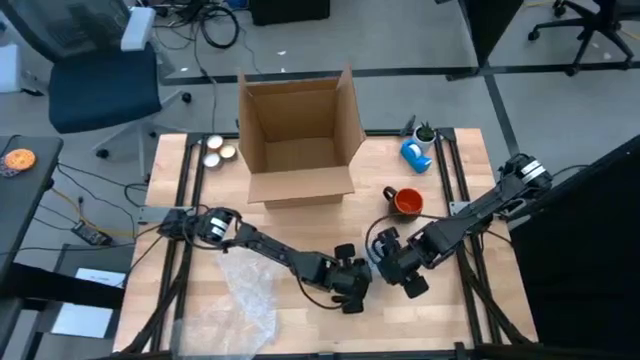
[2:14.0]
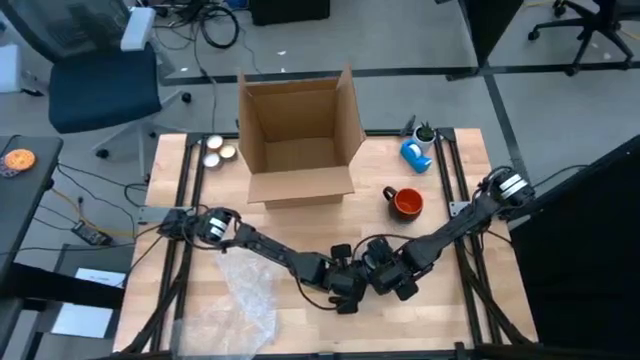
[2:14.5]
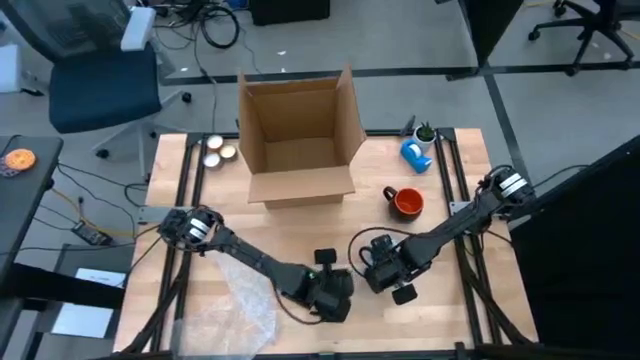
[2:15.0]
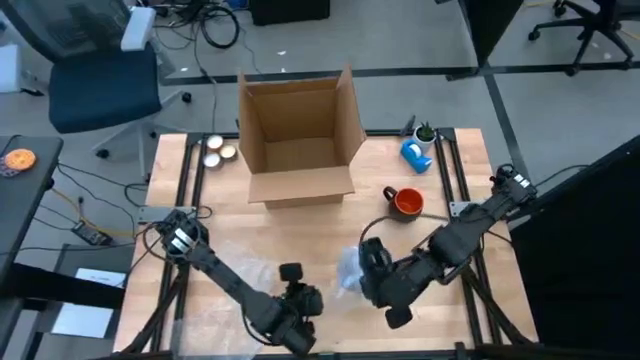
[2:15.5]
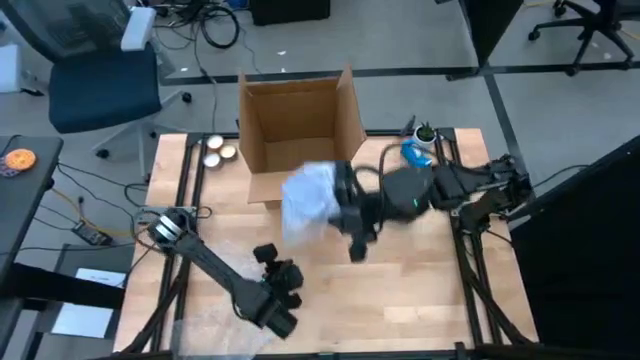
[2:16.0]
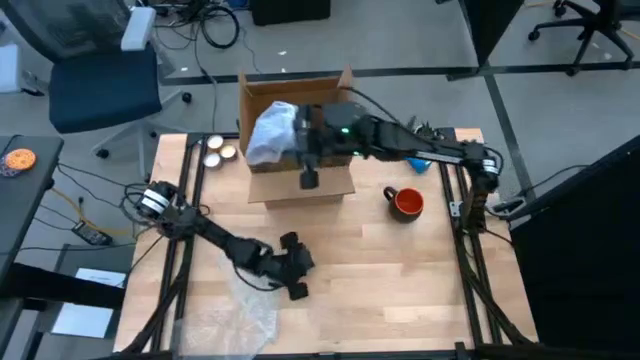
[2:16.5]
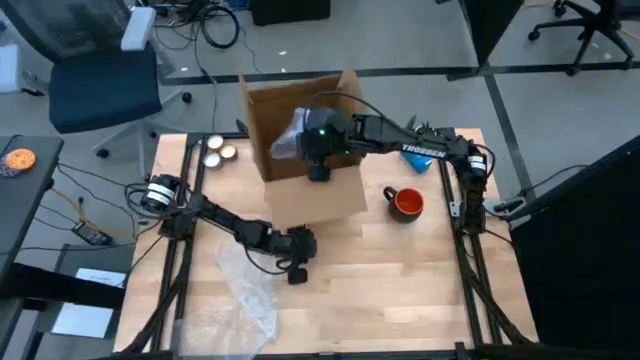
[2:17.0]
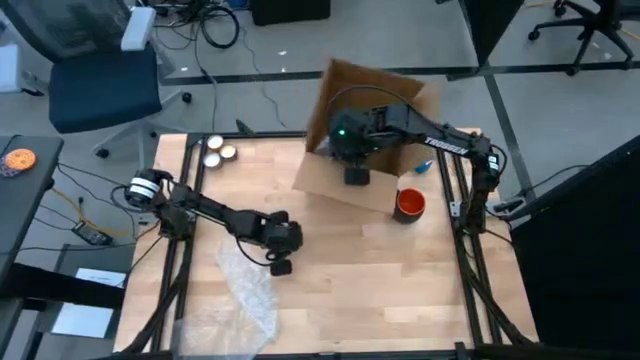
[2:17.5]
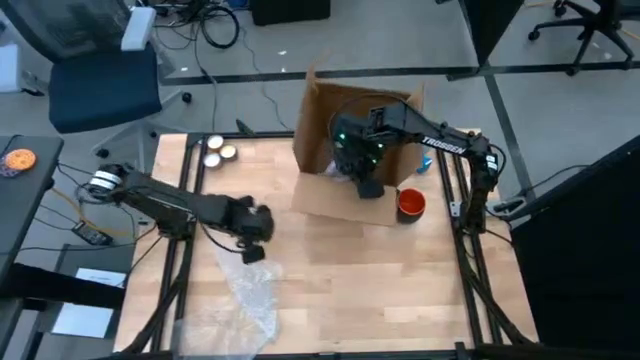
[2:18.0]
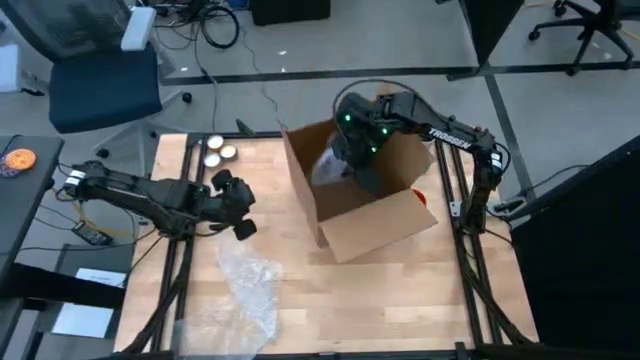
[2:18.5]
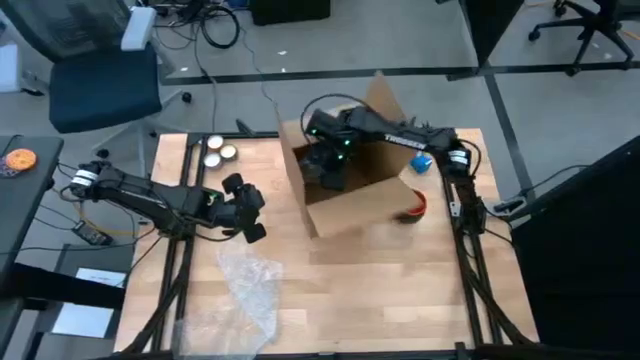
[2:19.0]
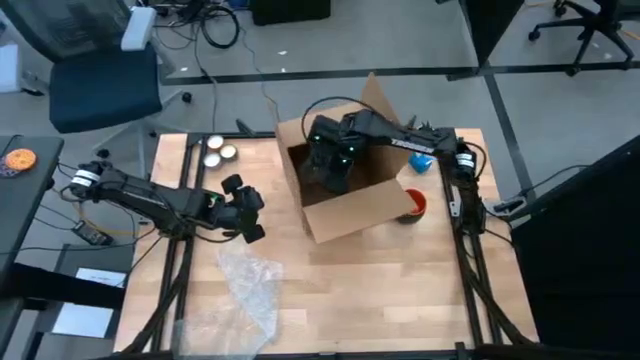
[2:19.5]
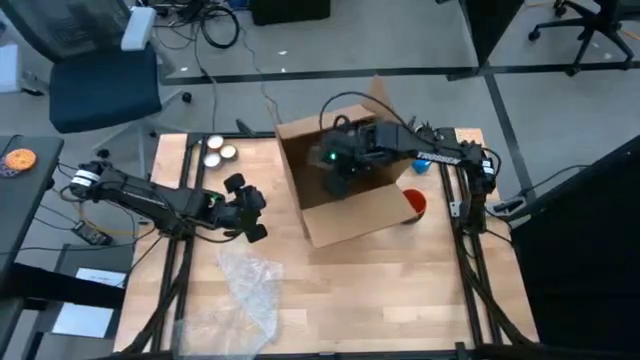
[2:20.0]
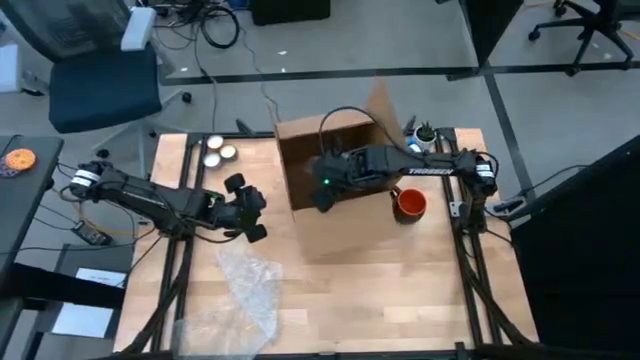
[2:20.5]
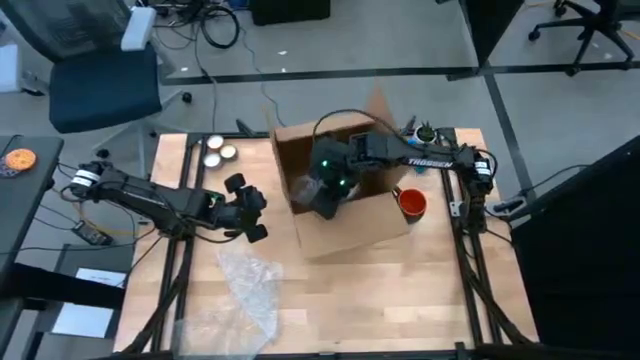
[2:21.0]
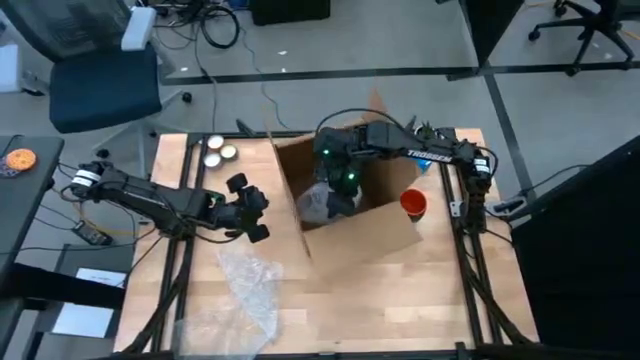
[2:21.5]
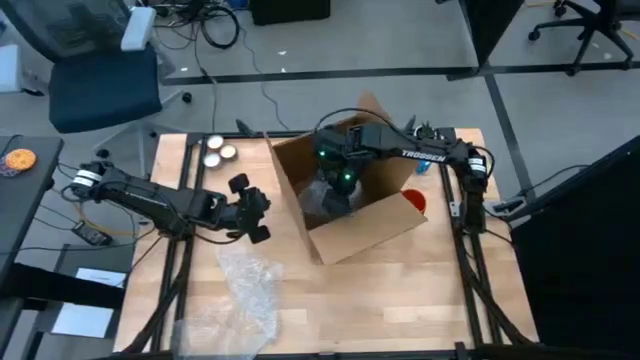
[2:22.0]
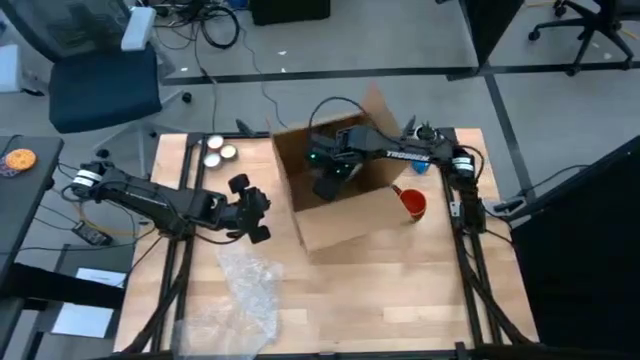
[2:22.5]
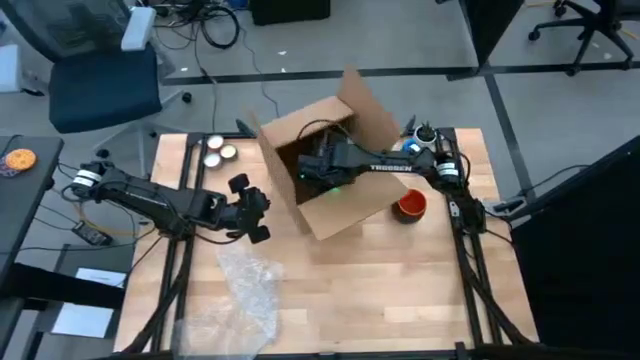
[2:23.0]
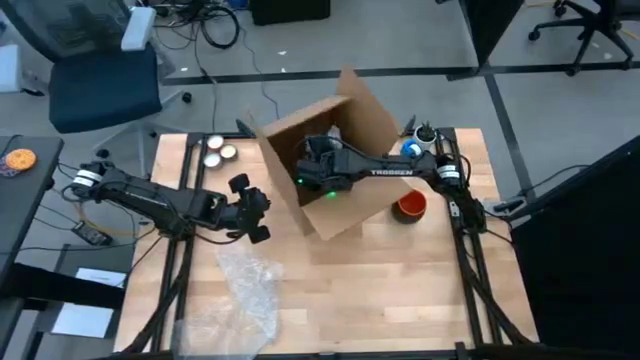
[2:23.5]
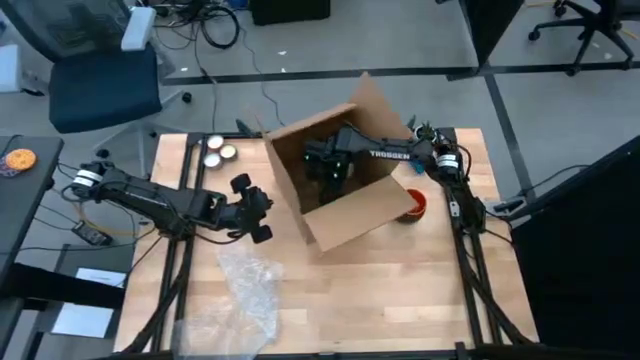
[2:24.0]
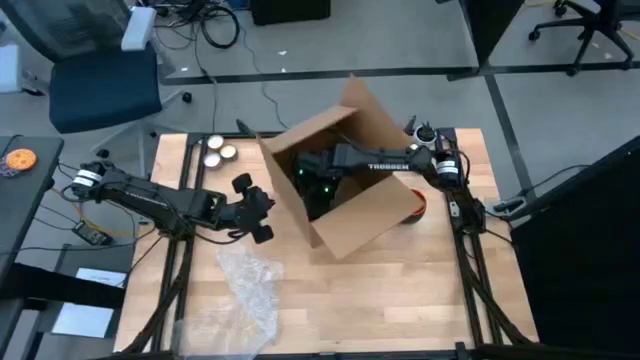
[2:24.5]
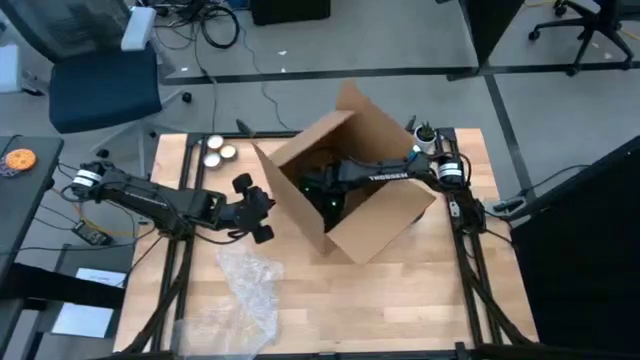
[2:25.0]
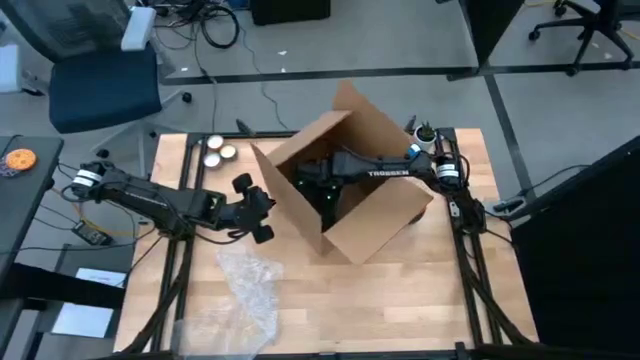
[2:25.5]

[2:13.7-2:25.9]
Task: wrap mug
Put the wrapped blue mug into the cardboard box

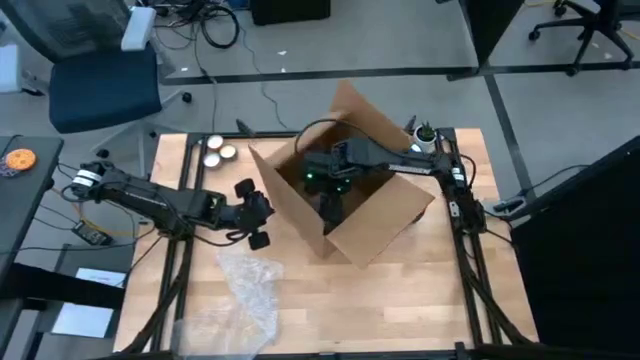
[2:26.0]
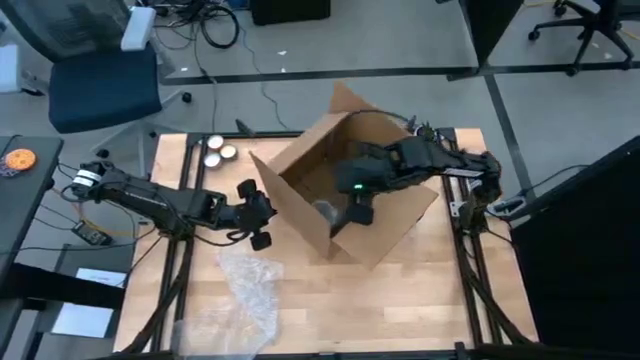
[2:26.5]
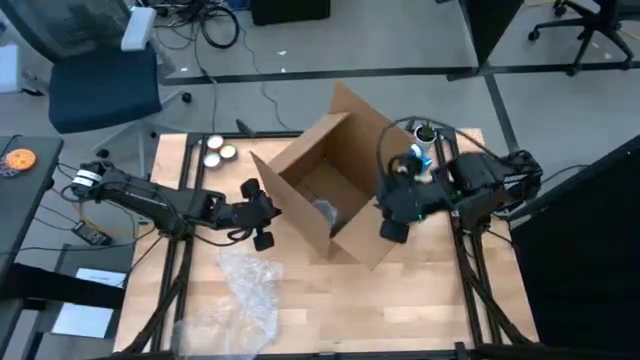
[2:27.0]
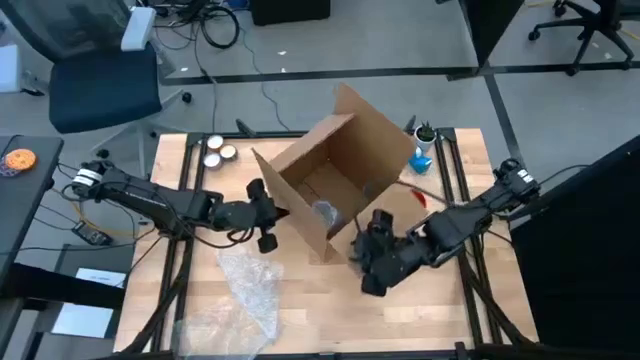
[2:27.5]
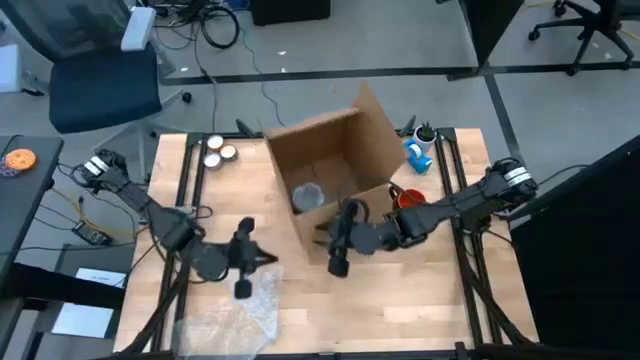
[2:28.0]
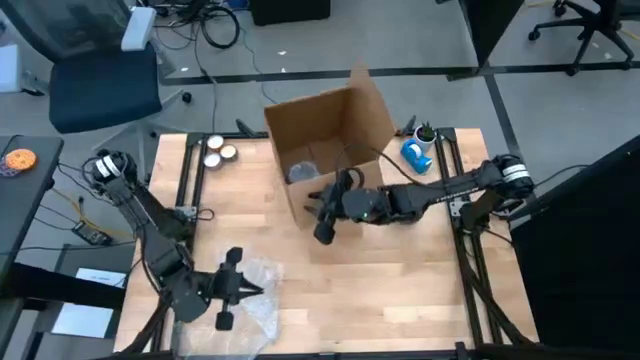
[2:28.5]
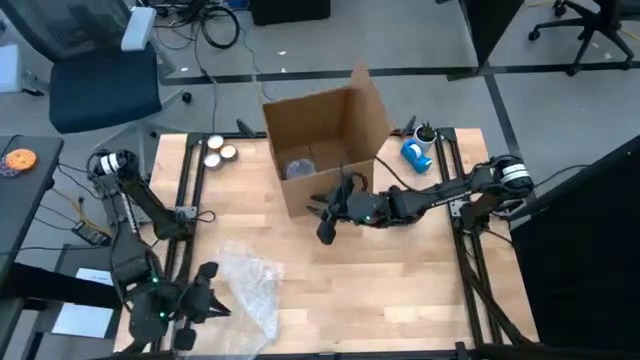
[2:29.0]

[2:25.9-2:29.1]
Adjust the cardboard box

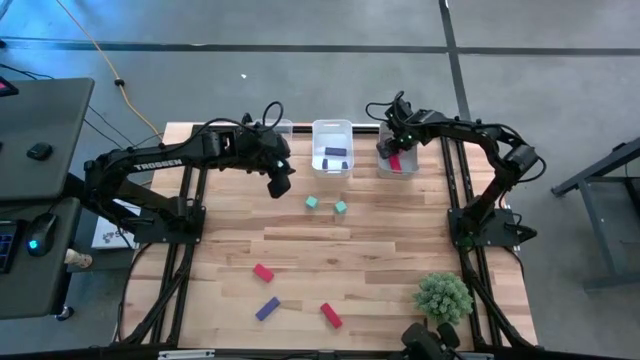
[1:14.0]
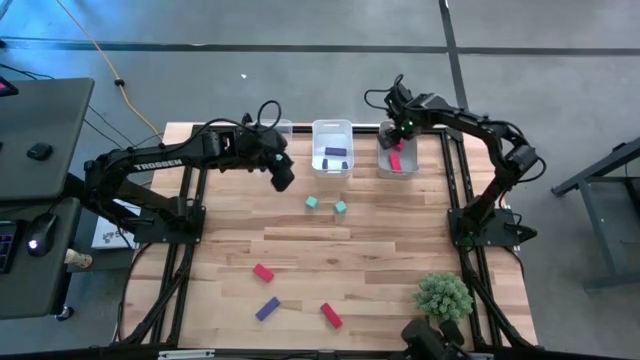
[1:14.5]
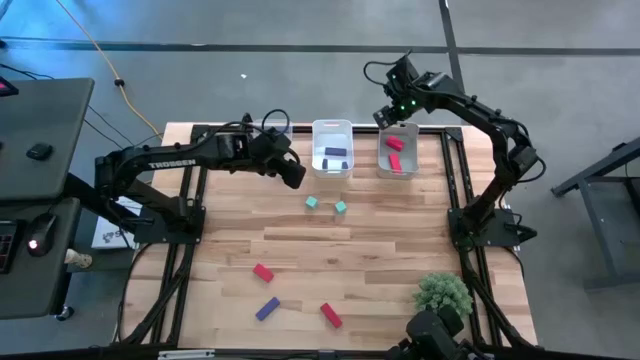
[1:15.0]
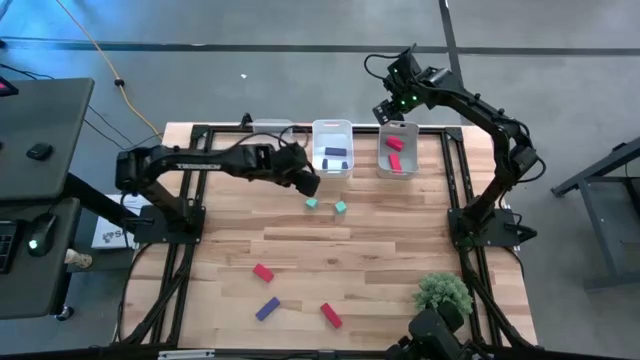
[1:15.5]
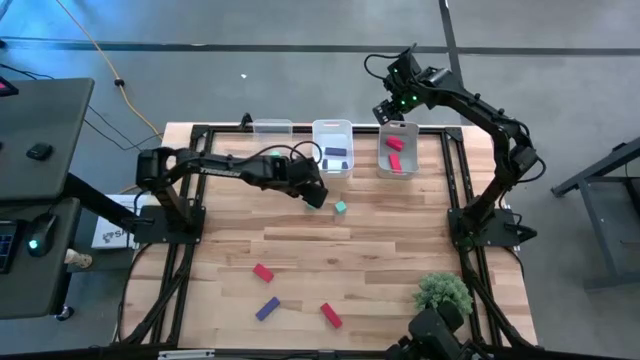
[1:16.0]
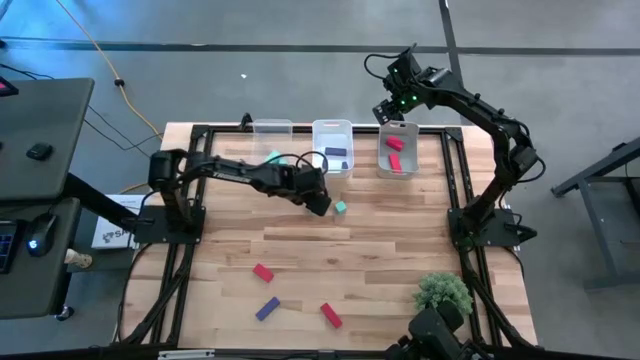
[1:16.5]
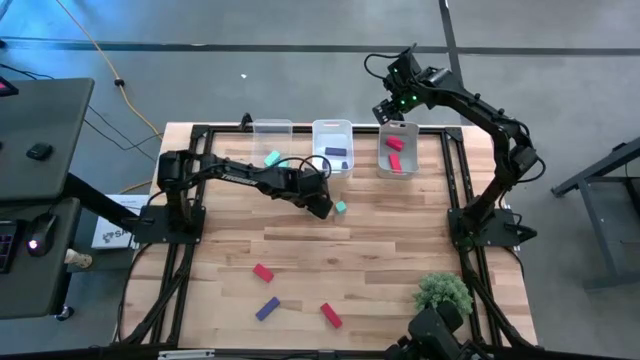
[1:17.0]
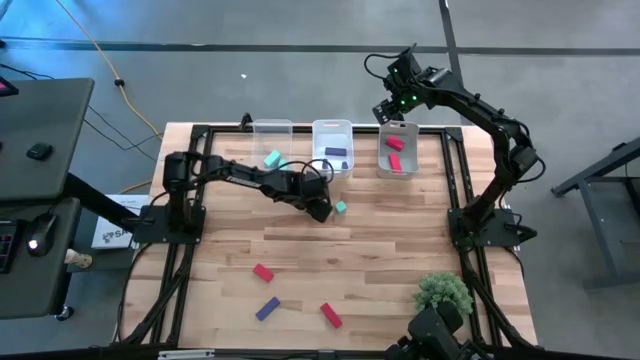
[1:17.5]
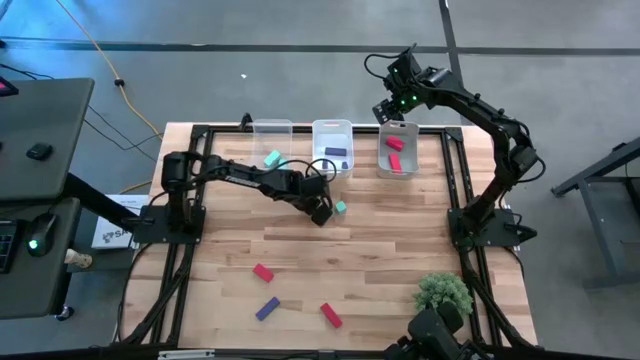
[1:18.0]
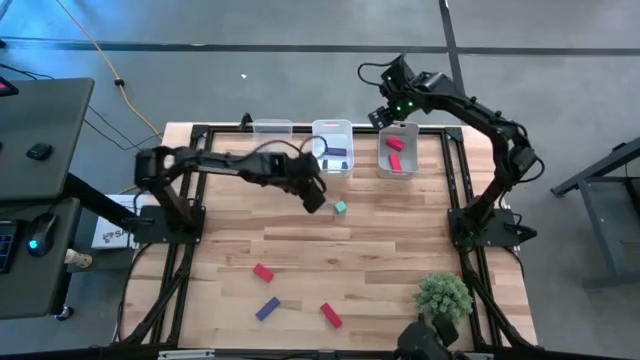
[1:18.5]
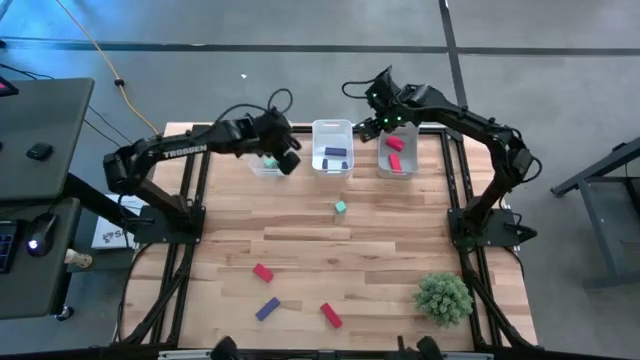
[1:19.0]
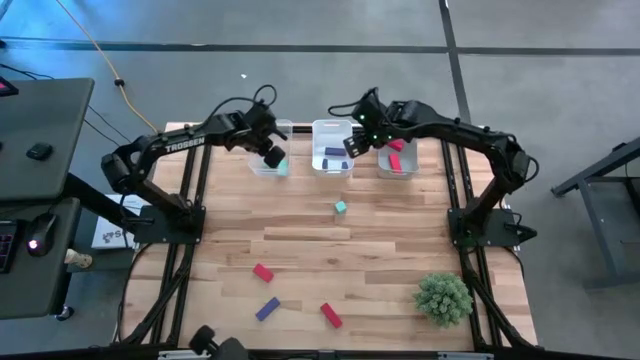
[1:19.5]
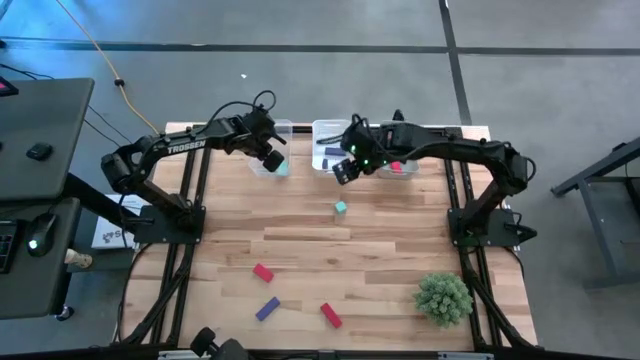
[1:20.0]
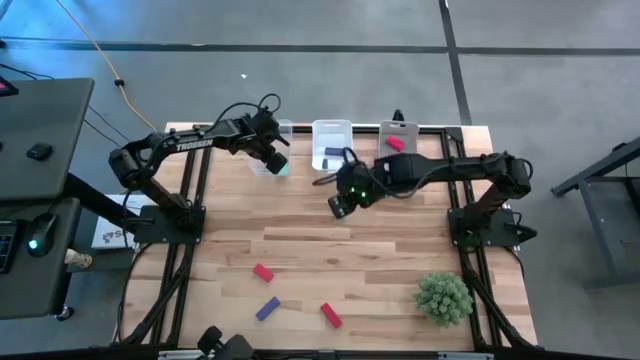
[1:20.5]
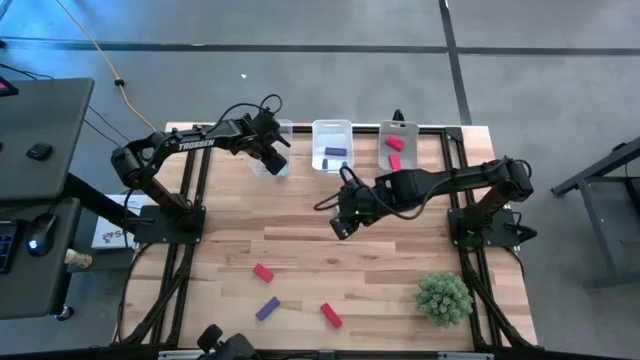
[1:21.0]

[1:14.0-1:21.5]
Task: Sort & place blocks by color
Put the light blue block into the transparent bin
